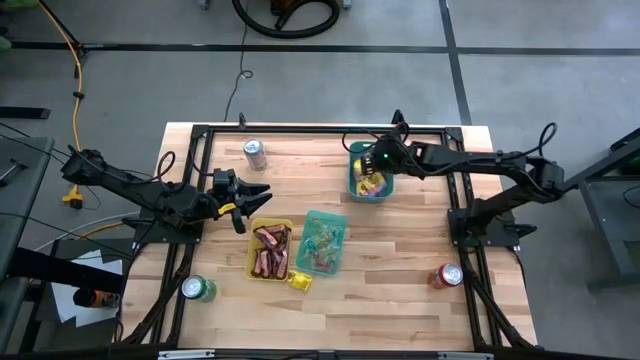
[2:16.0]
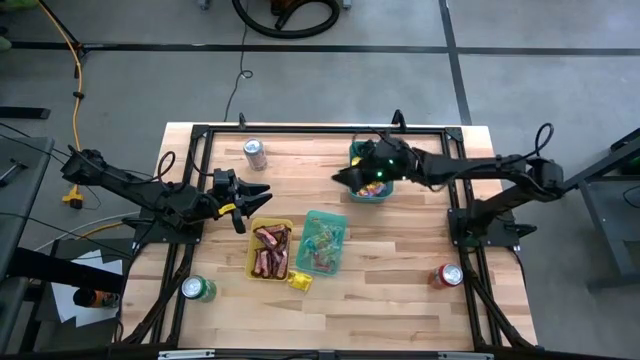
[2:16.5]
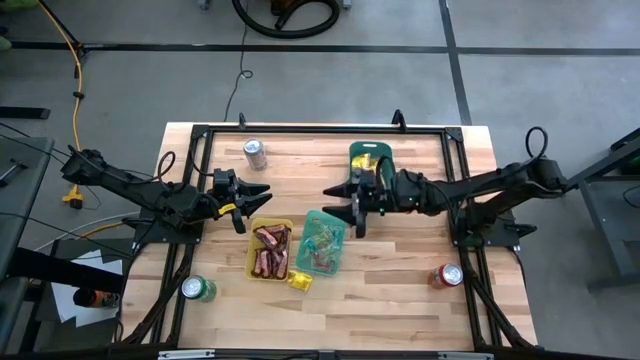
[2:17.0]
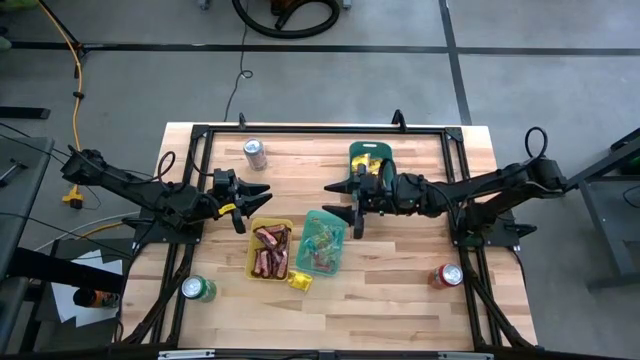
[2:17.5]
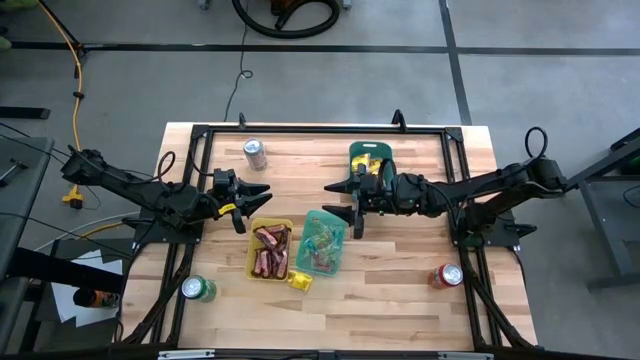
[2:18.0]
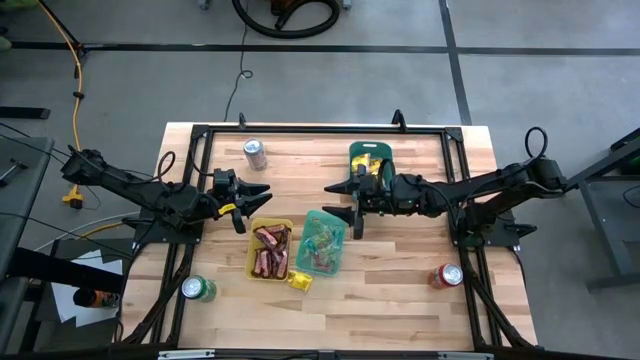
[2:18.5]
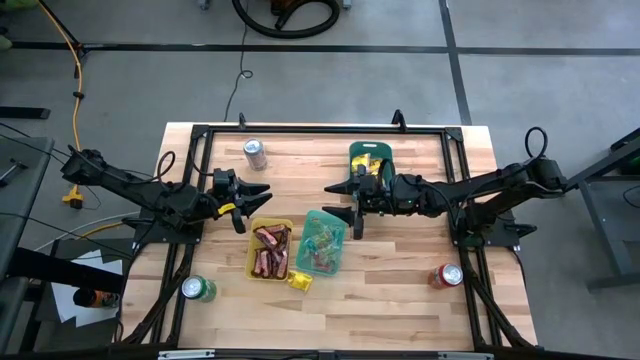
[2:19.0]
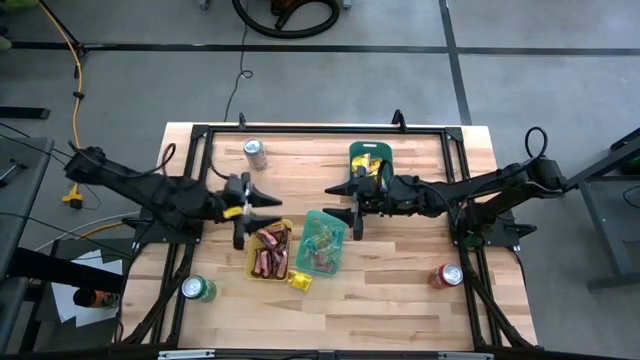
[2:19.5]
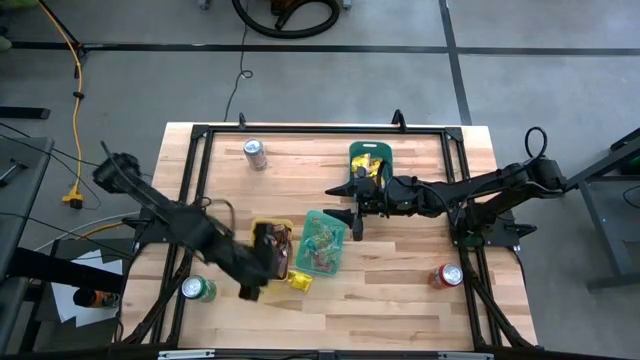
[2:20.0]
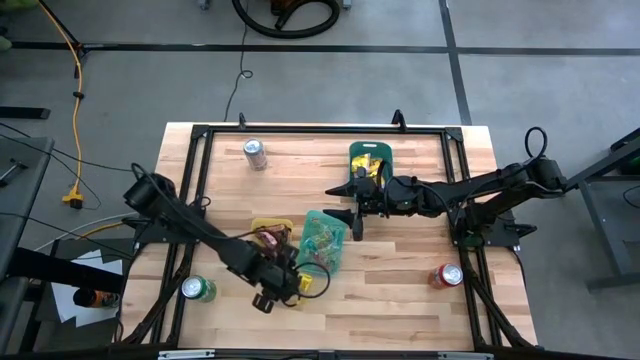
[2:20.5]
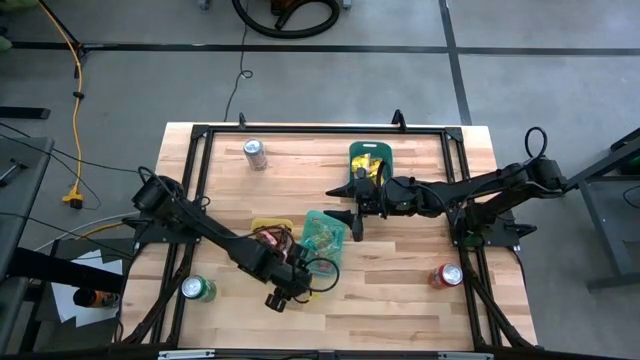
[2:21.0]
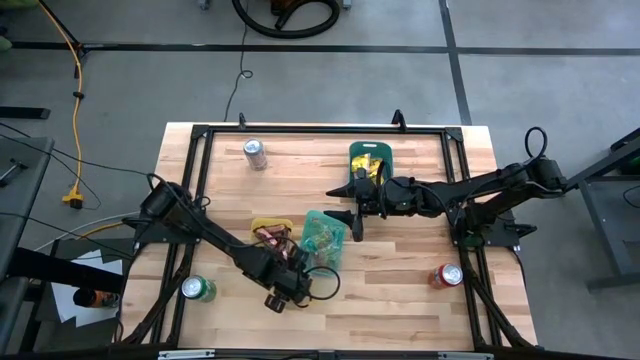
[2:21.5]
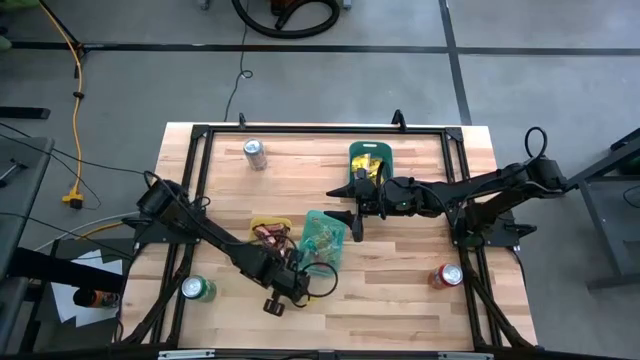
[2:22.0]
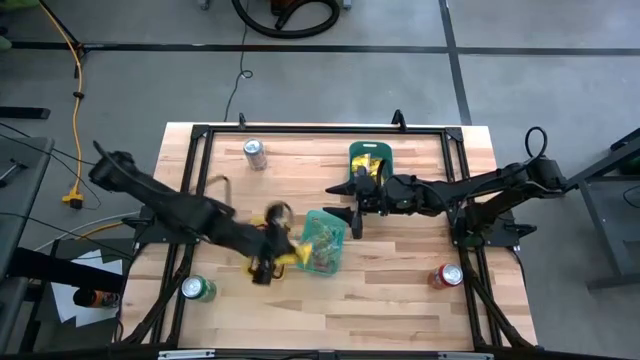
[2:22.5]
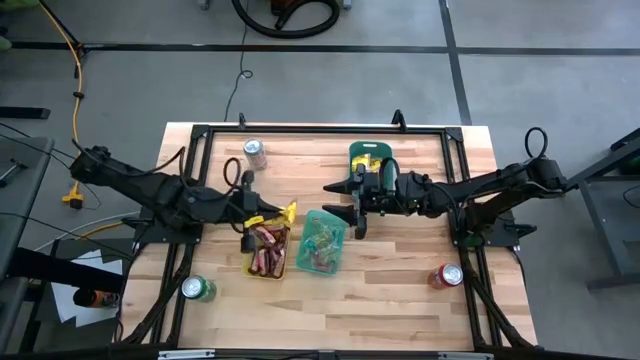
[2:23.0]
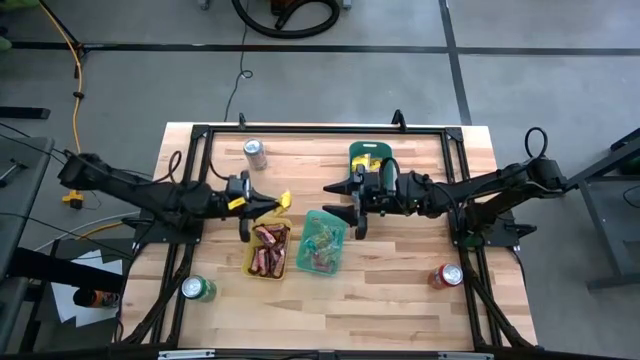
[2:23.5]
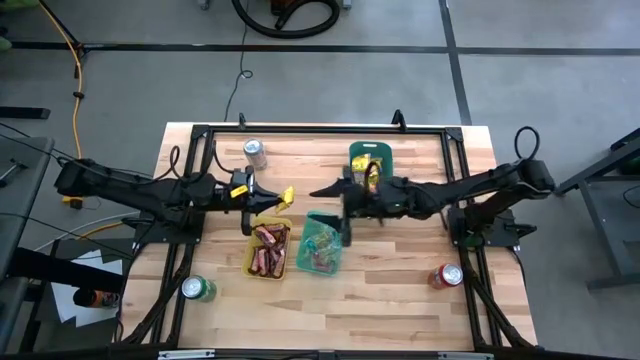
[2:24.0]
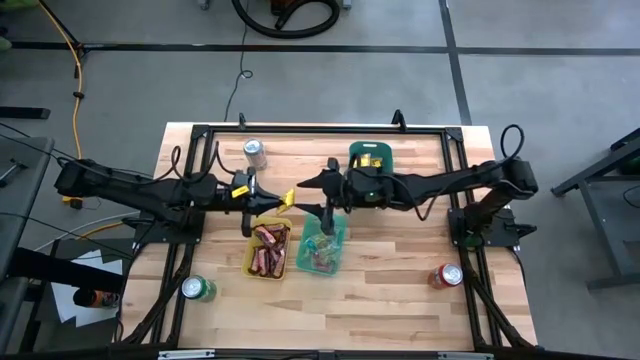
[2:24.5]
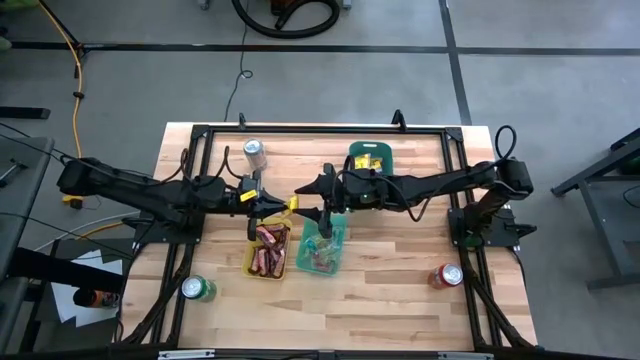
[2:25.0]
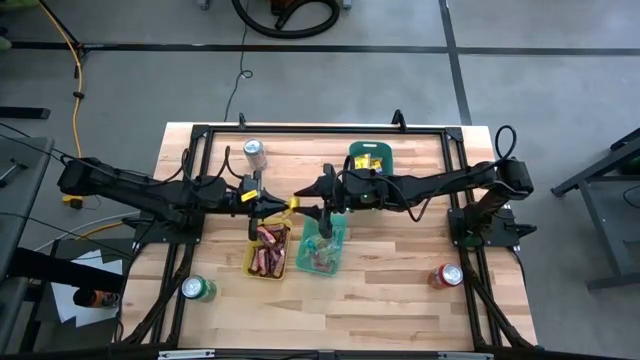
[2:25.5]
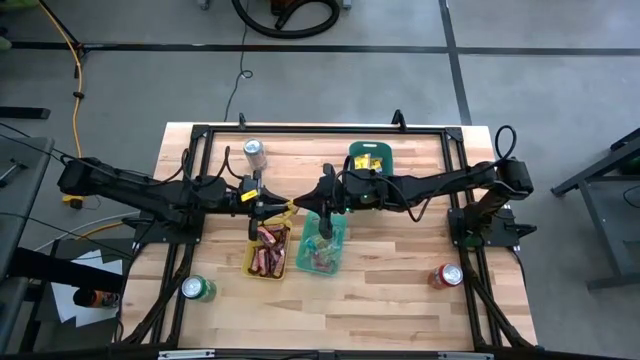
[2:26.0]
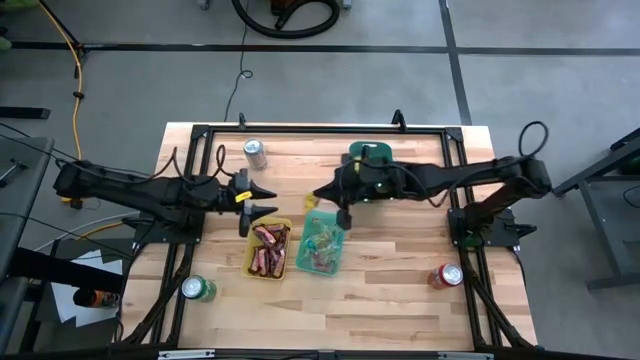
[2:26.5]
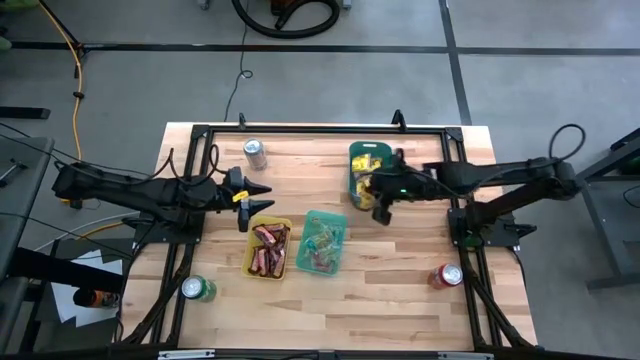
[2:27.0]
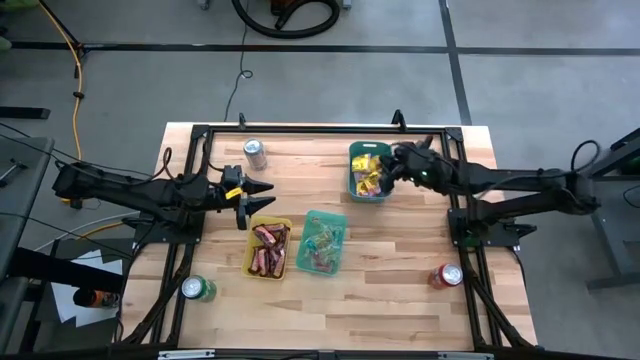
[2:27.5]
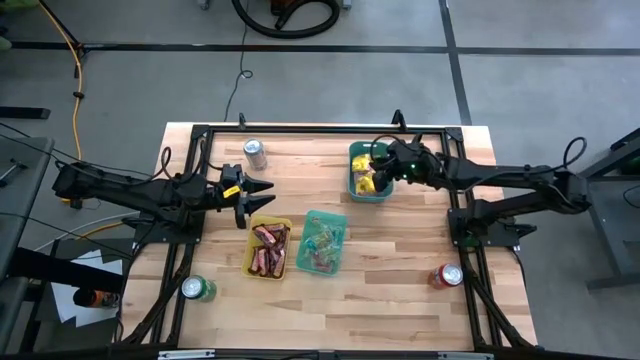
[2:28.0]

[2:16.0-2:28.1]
Task: Sort candy
Put the yellow candy into the blue bin

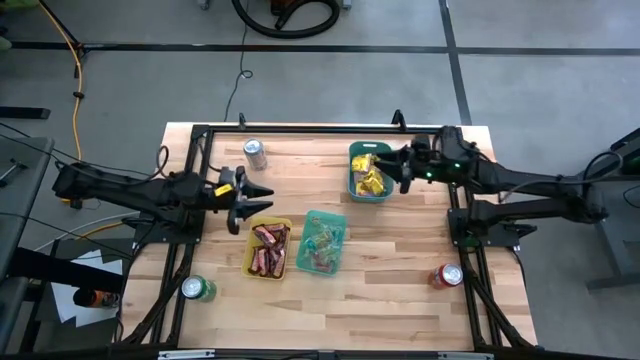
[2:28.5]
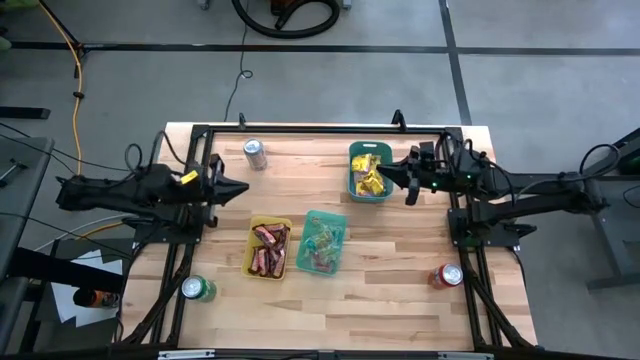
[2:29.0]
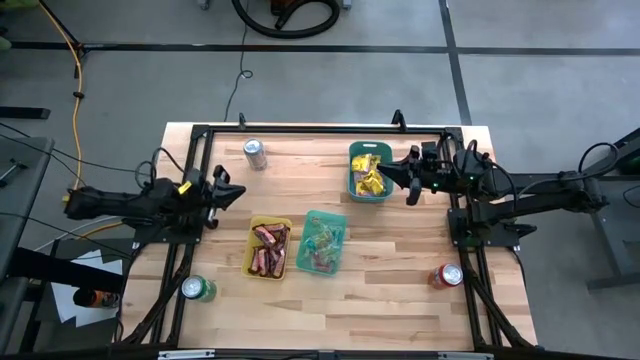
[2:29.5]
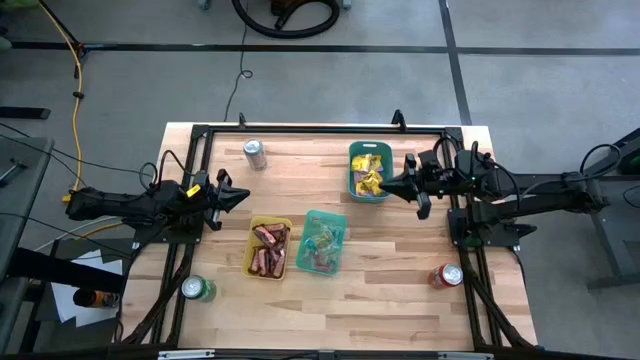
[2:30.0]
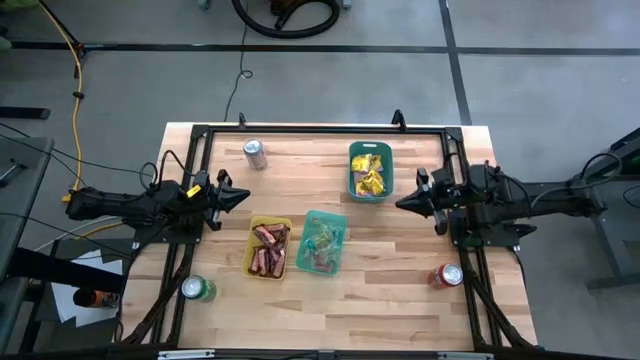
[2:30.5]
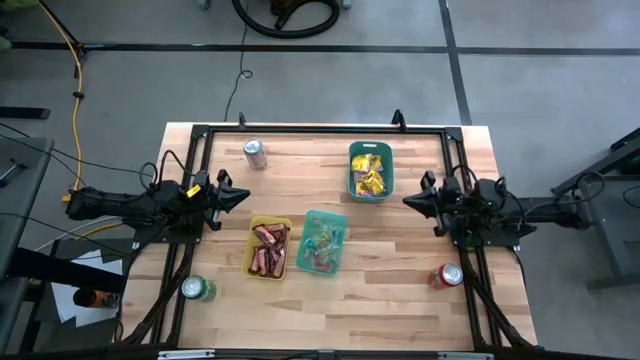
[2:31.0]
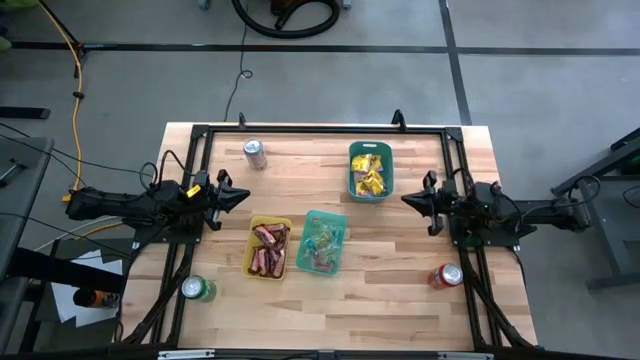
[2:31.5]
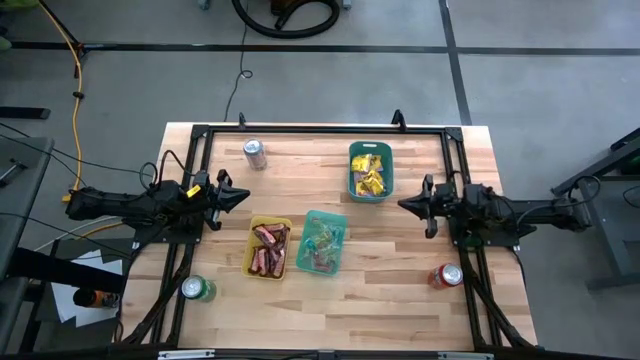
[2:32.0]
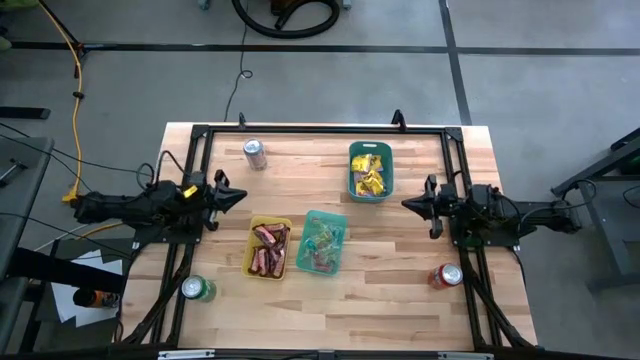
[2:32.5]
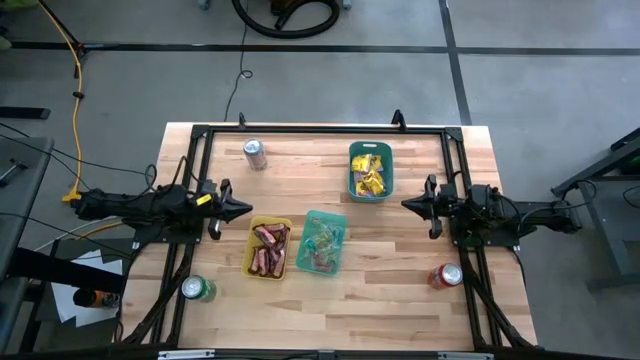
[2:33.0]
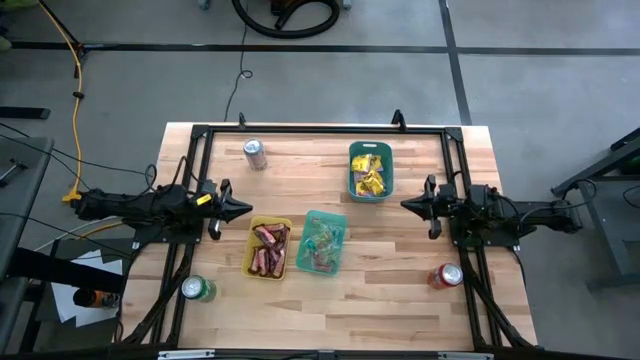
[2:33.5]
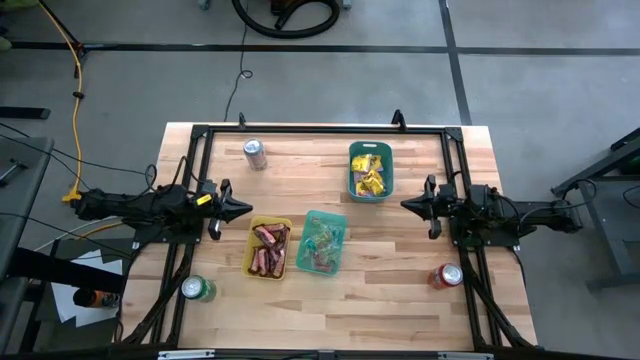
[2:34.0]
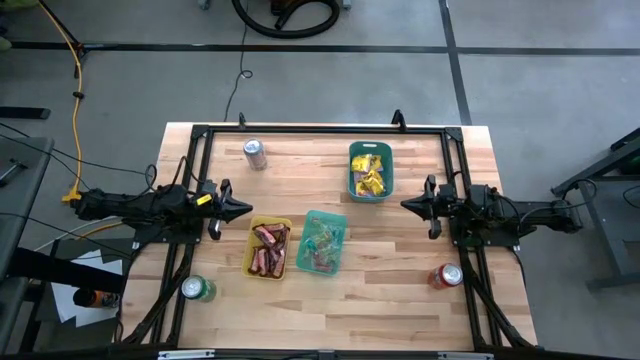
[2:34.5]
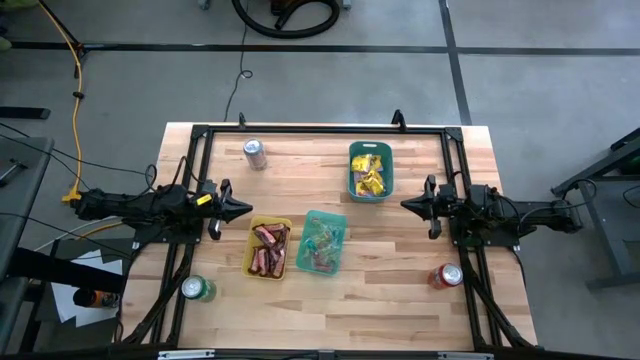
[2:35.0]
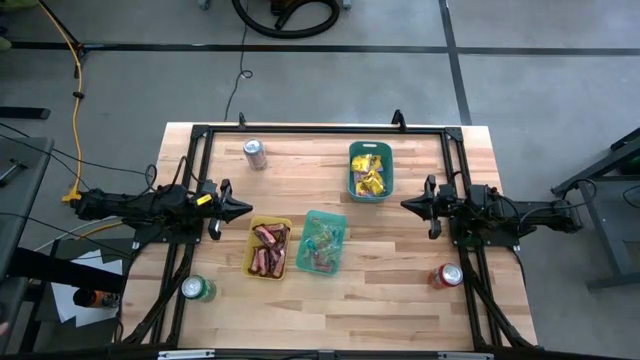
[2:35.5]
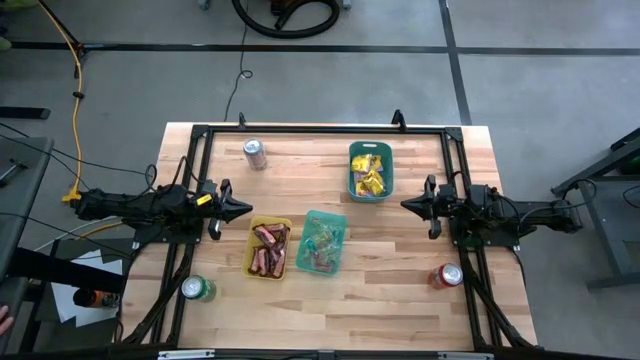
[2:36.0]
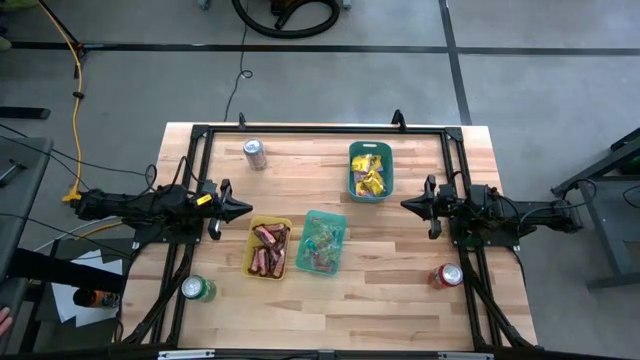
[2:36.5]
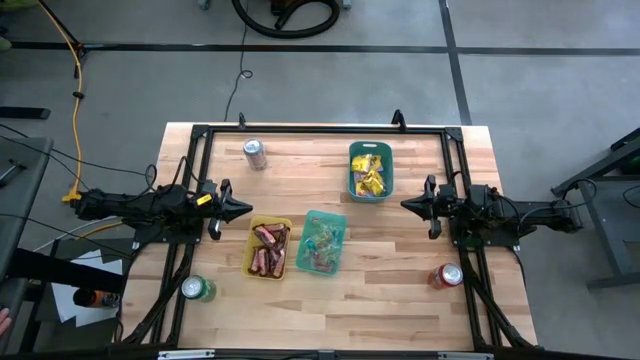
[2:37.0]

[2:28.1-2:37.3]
Return to Home Position
